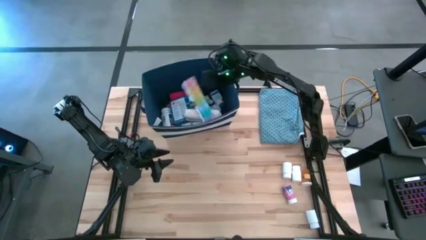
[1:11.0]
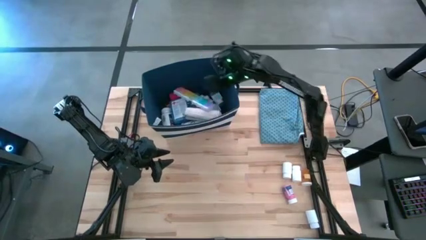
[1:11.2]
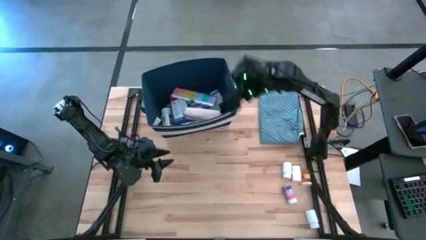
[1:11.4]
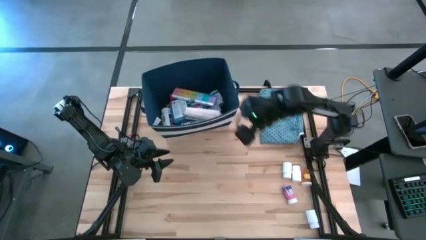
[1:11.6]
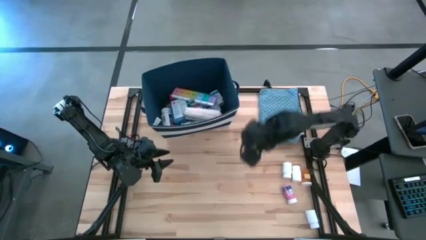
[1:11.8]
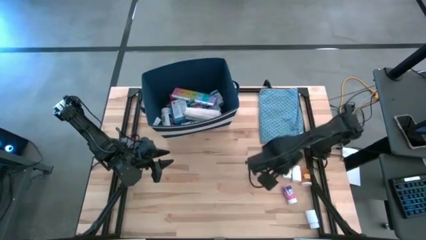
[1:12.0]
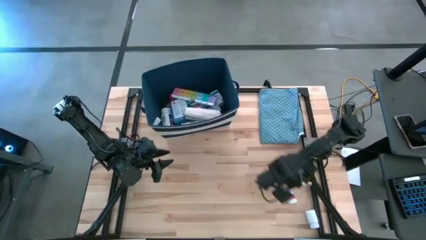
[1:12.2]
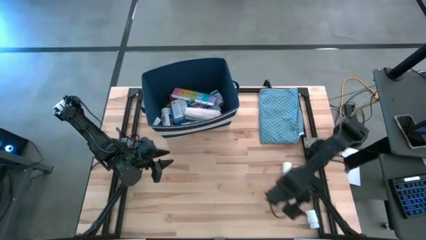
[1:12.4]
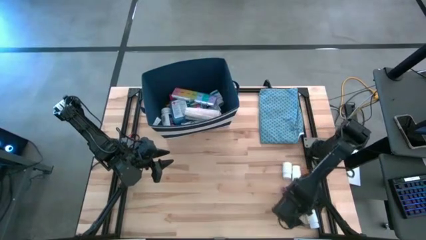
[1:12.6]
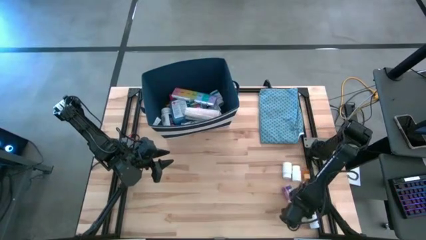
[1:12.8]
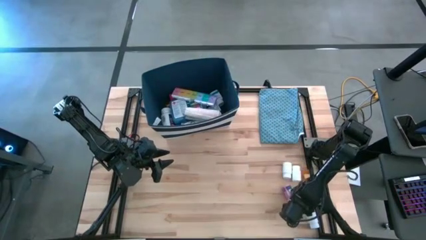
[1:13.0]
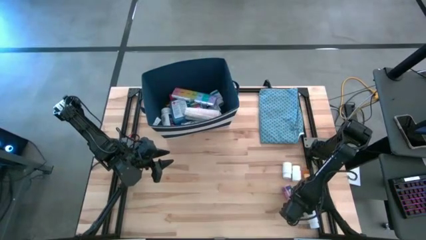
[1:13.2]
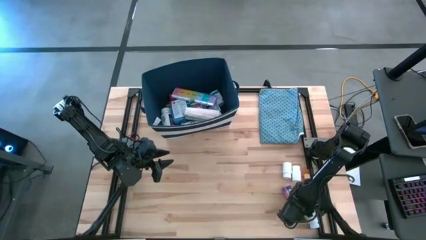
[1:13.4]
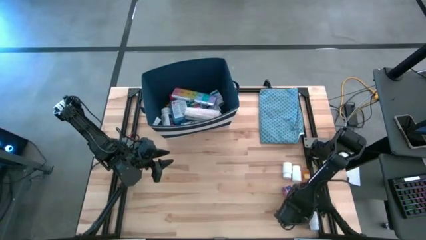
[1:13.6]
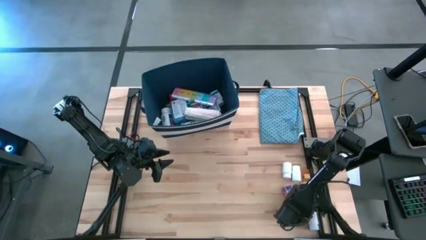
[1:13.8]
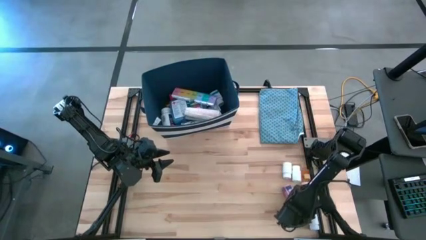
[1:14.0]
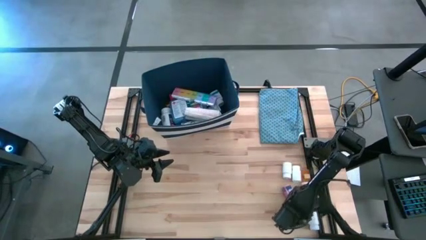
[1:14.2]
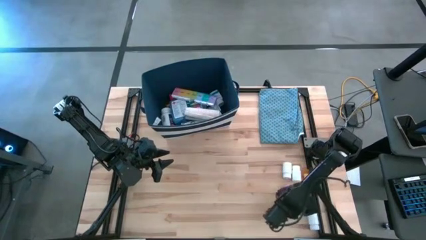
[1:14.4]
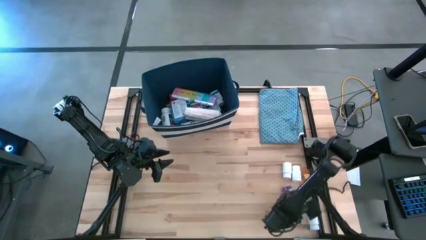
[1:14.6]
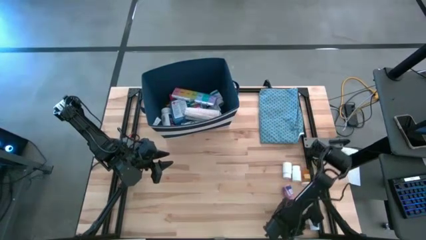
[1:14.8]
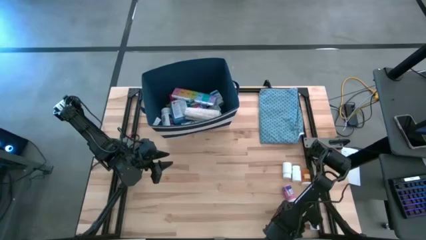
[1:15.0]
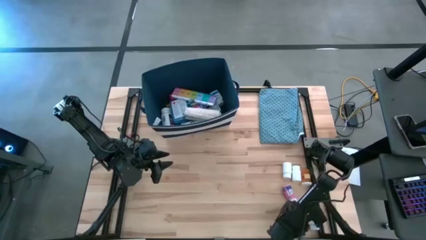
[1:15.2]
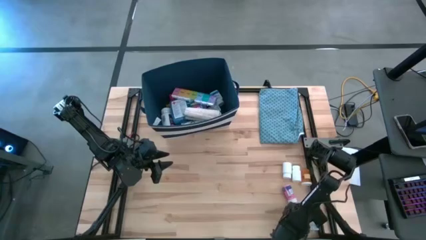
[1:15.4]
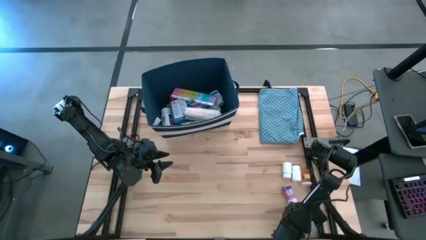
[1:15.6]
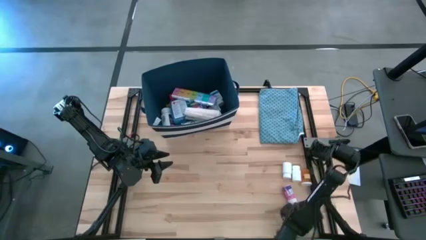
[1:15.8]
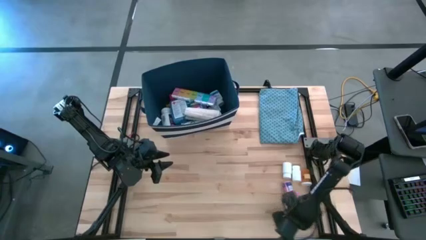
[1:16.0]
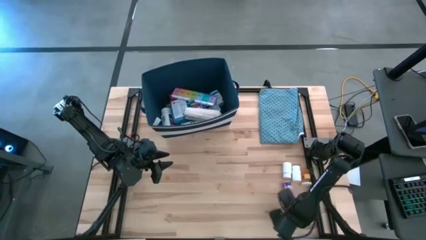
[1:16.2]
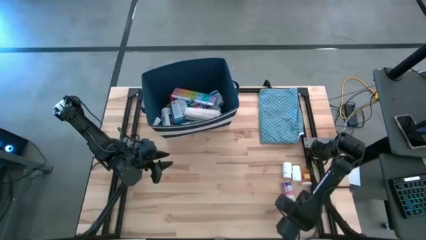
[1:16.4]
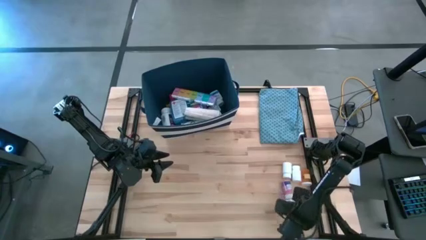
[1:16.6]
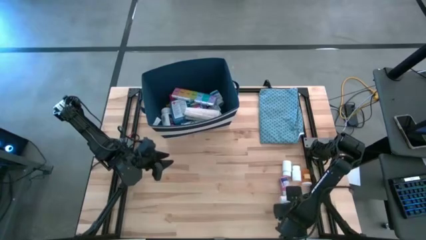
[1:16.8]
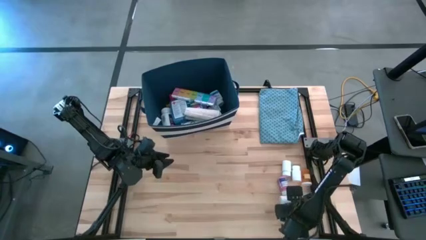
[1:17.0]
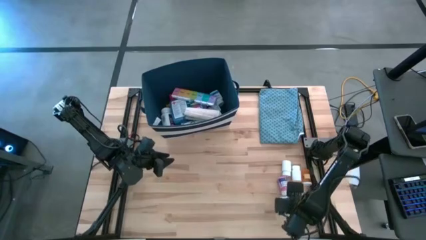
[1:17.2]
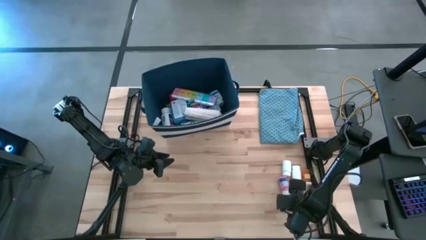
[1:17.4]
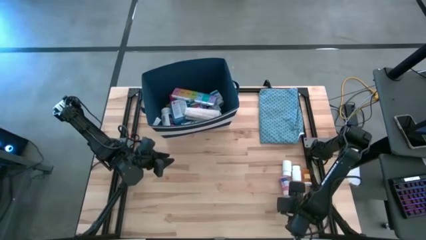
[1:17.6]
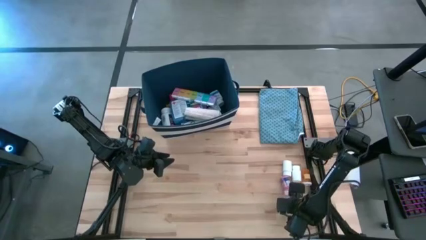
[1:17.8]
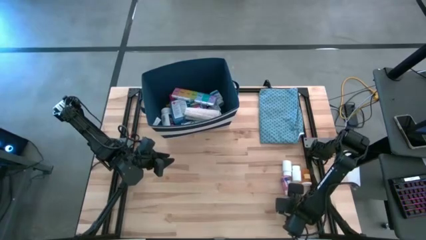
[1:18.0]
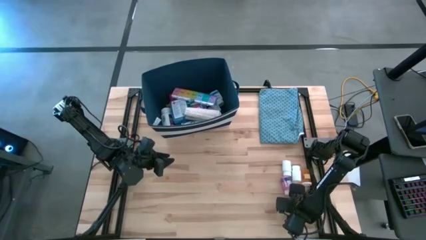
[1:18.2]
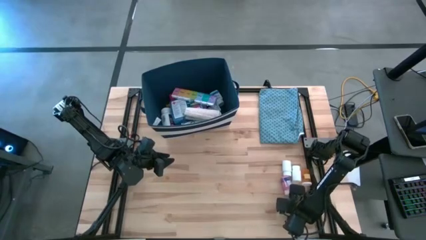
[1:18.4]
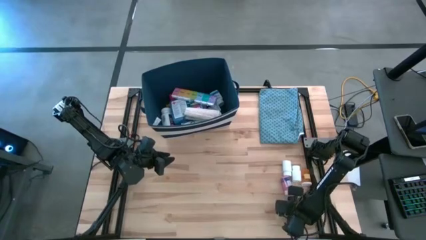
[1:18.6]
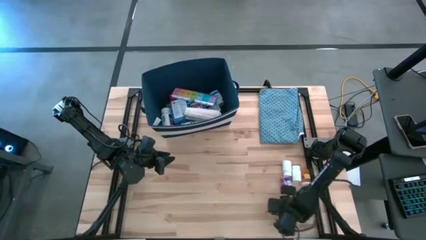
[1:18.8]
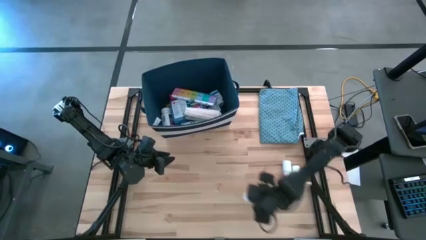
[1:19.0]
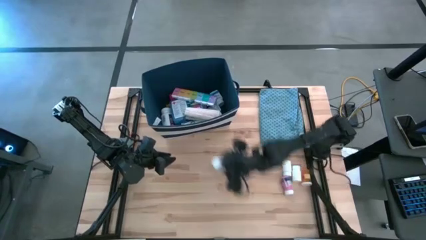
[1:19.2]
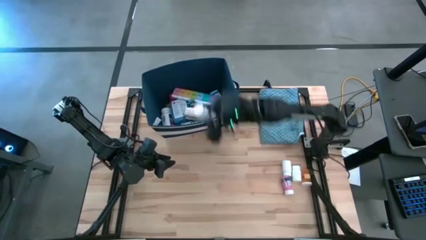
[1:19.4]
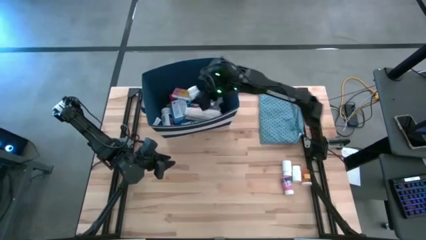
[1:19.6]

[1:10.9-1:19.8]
Task: Pick & place medical supplies in basket/bin
Put the bottom white medicine bottle into the blue bin

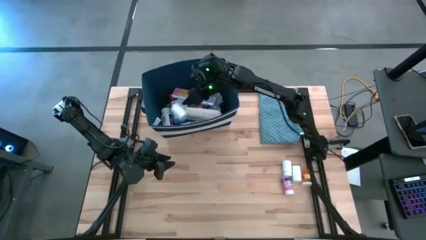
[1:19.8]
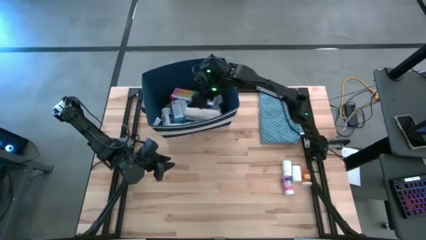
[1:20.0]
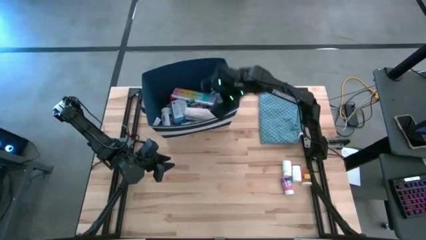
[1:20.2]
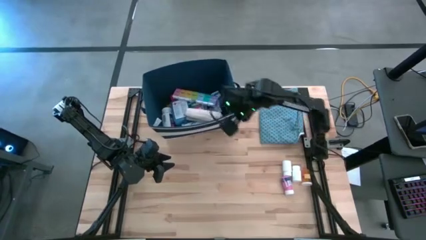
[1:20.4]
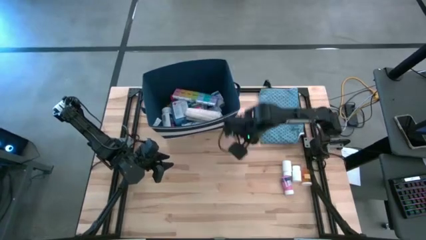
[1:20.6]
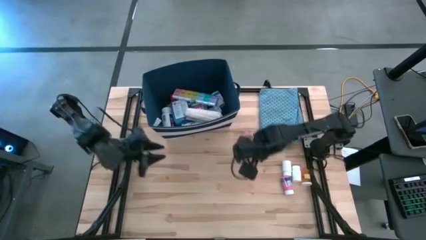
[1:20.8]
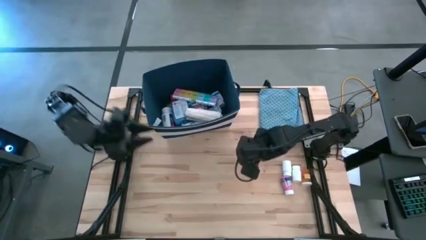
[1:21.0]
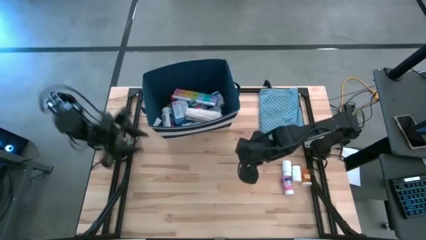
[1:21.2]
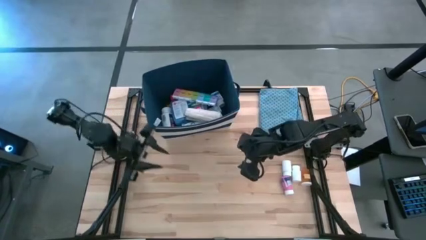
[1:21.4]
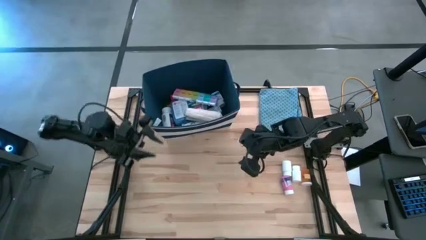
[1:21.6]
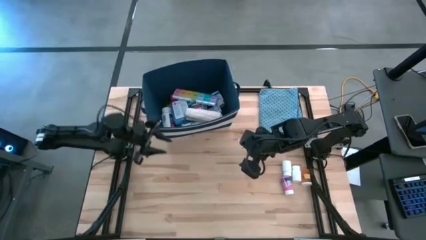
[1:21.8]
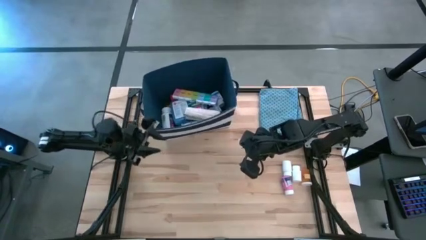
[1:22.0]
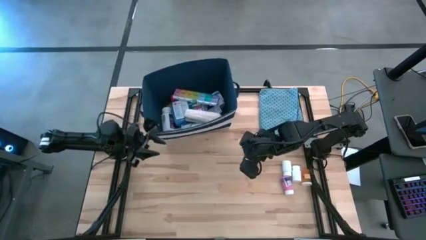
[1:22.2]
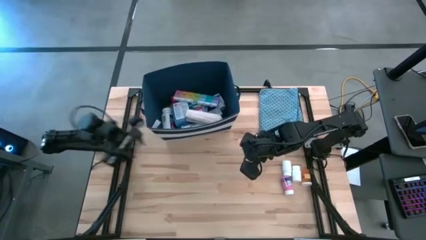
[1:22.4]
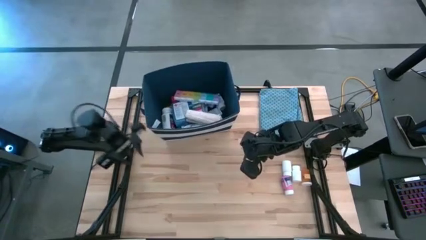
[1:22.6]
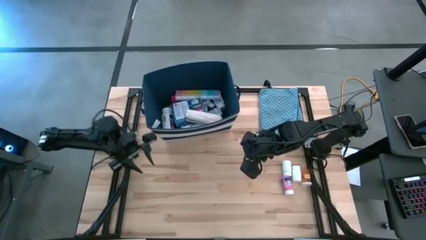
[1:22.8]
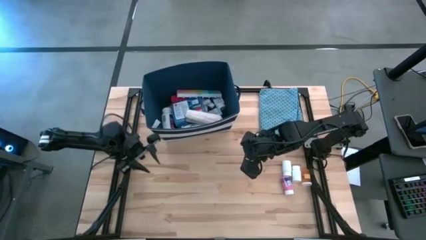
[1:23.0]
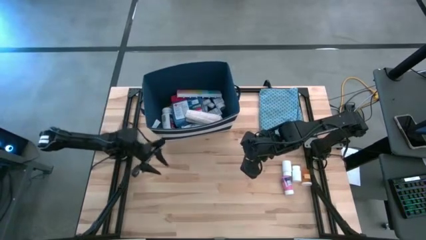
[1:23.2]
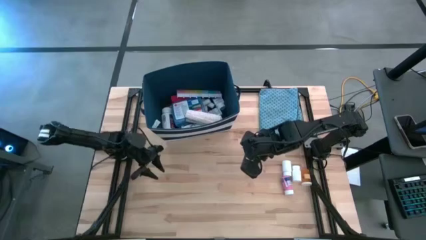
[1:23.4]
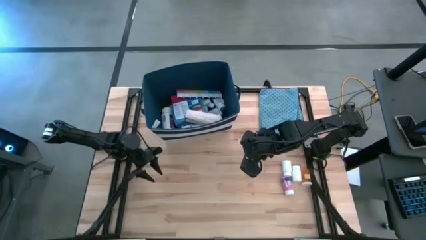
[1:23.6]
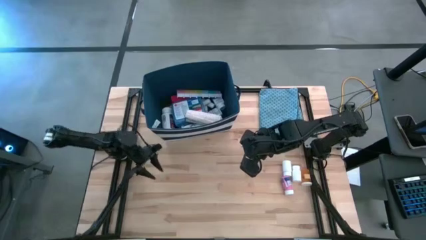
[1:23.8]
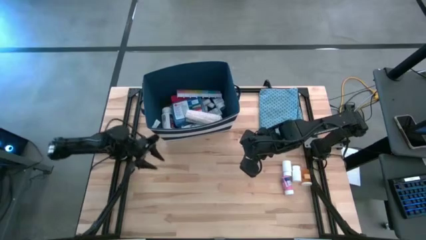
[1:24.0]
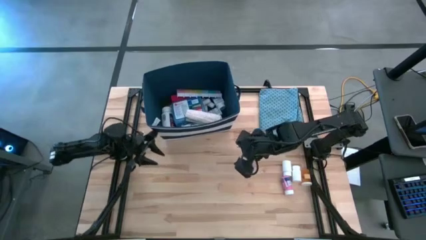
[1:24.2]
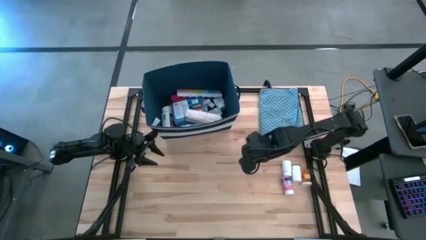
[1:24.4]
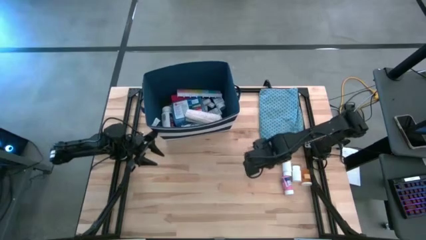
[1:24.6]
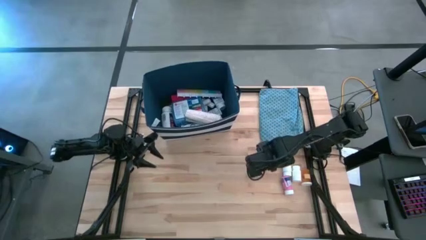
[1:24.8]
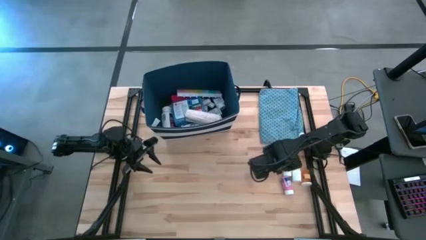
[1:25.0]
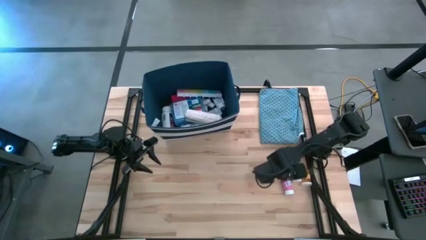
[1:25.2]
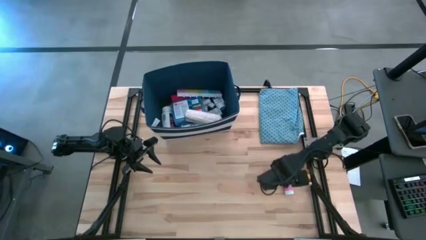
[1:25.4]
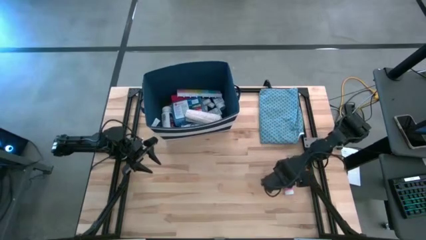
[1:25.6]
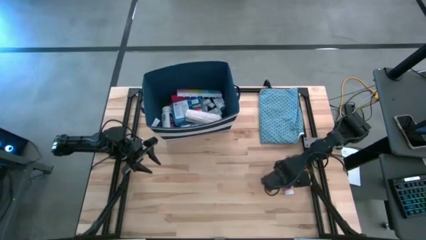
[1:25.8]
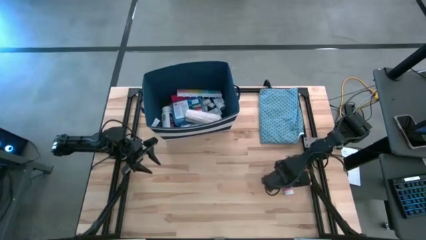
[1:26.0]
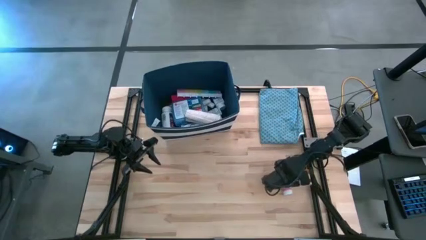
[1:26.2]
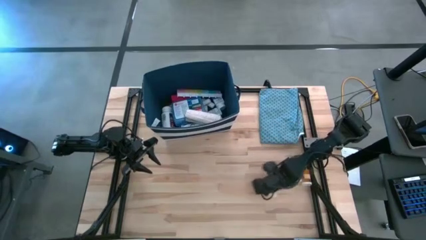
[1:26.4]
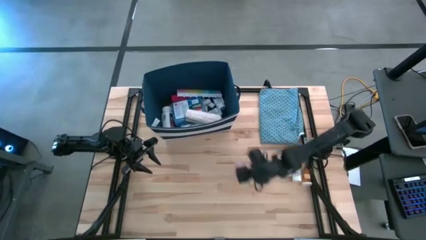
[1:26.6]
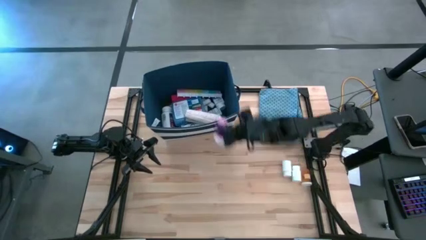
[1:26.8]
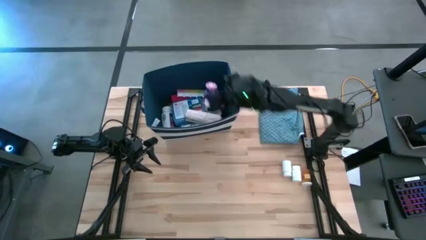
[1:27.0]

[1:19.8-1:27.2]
Put the pink medicine bottle into the blue bin

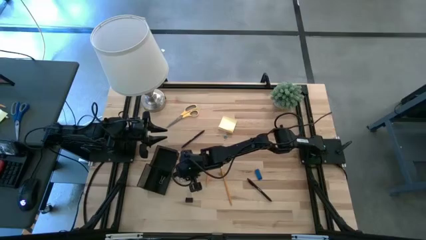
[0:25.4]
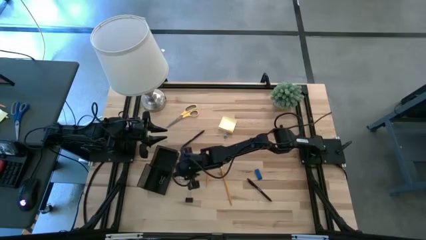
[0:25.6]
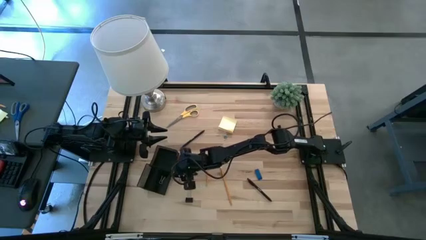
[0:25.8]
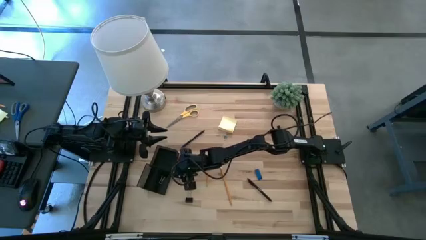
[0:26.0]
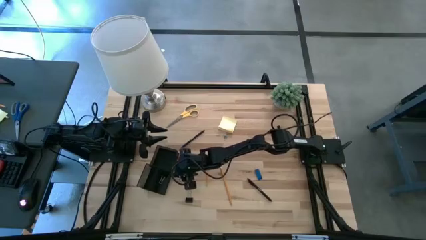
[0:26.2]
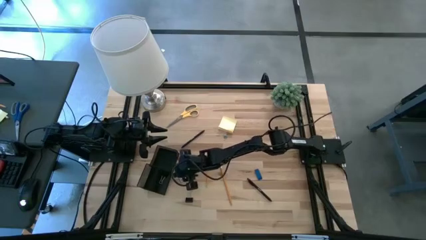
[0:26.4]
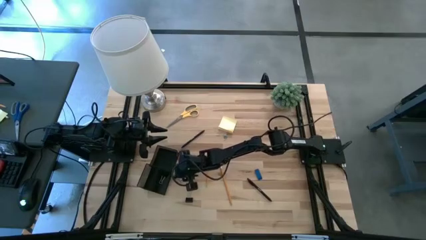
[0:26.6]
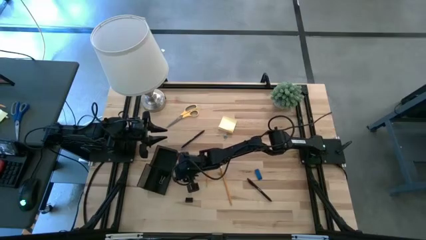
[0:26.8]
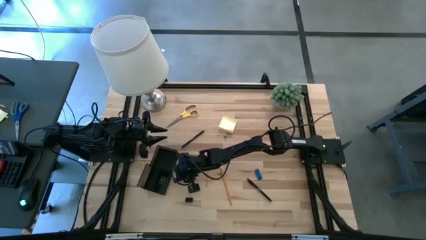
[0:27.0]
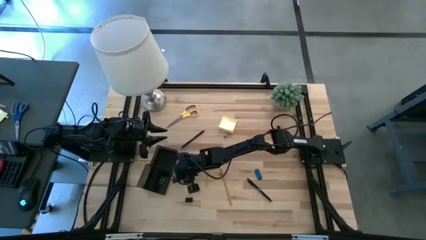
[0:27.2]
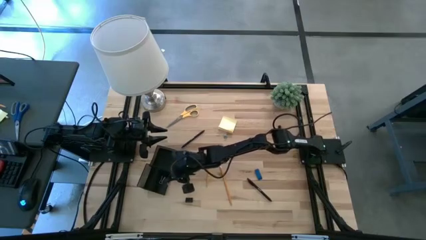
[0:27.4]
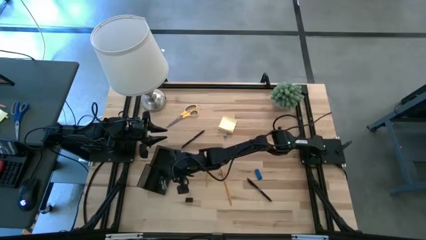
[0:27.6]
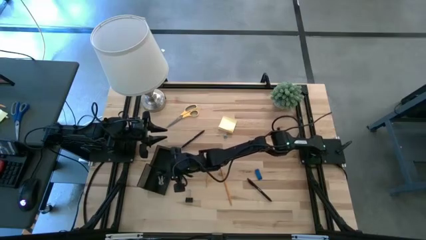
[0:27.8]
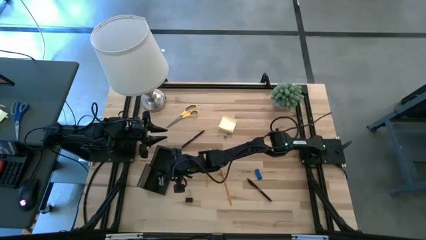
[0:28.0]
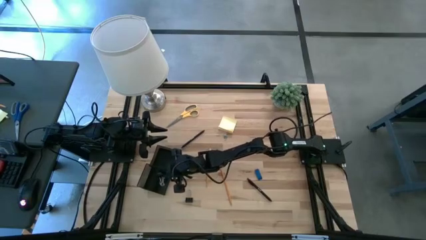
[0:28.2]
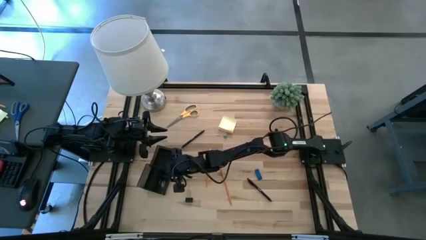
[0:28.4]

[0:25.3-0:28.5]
Task: Pick and place office supplies into organizer
Put the top black binder clip into the black desk organizer
